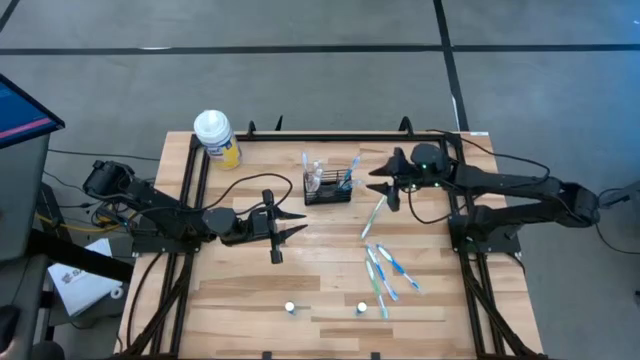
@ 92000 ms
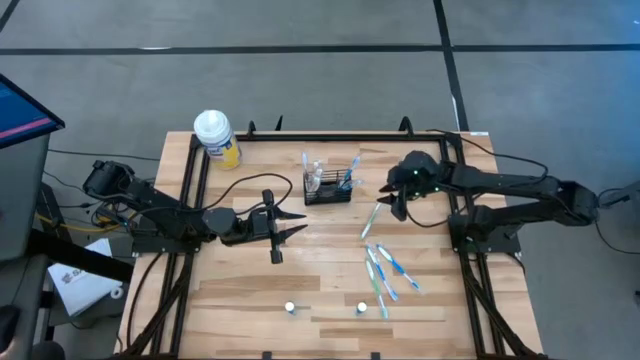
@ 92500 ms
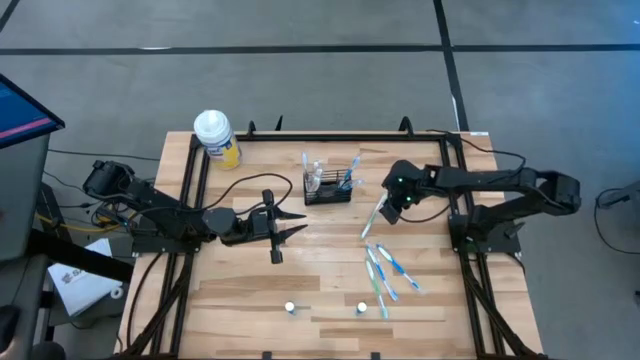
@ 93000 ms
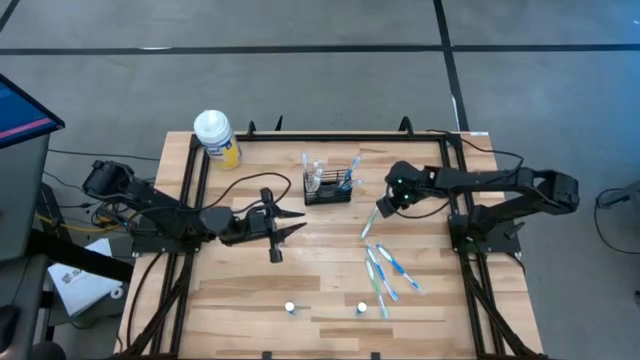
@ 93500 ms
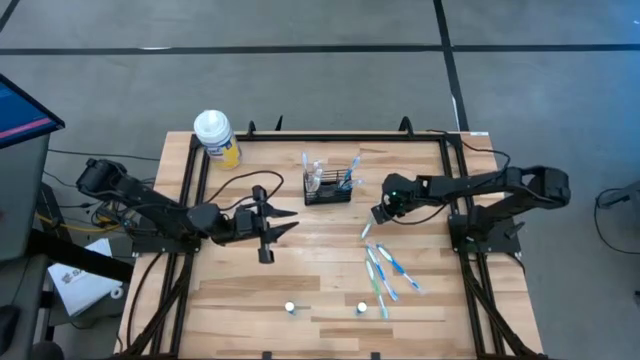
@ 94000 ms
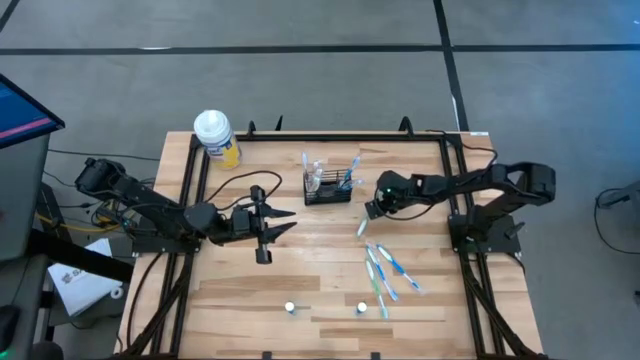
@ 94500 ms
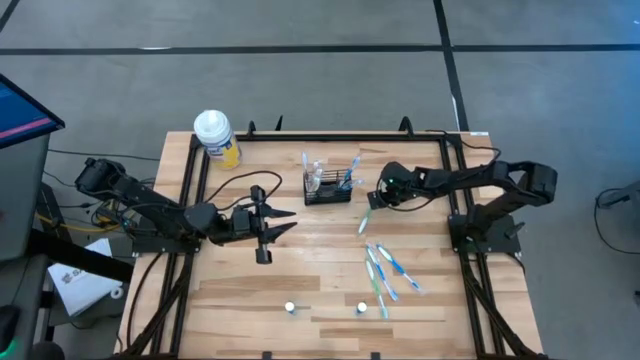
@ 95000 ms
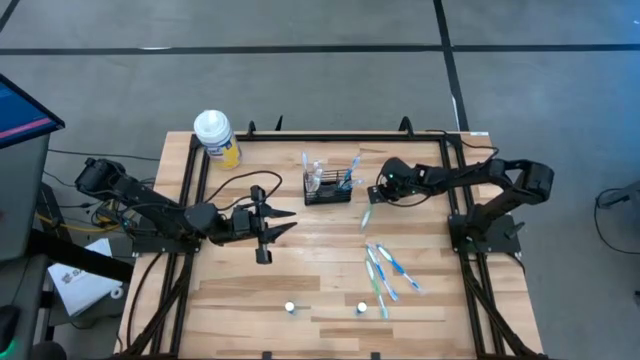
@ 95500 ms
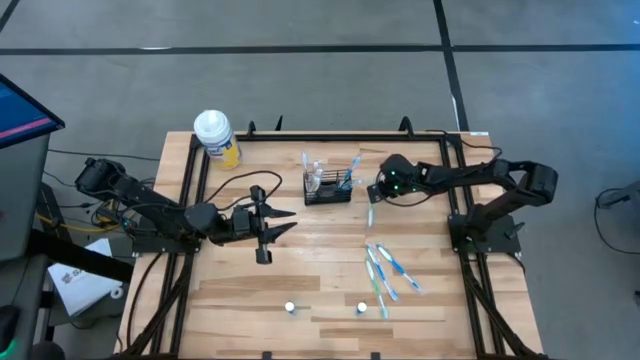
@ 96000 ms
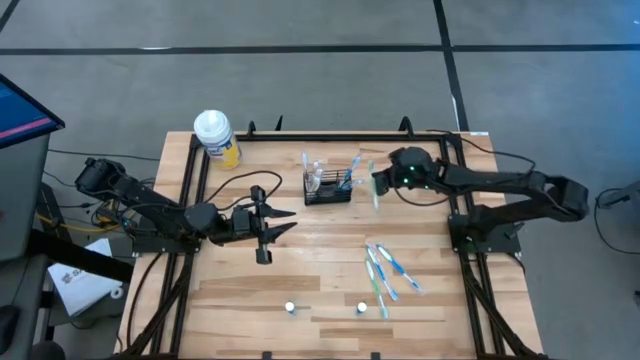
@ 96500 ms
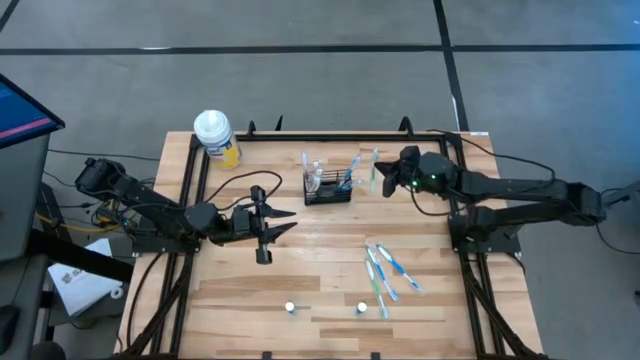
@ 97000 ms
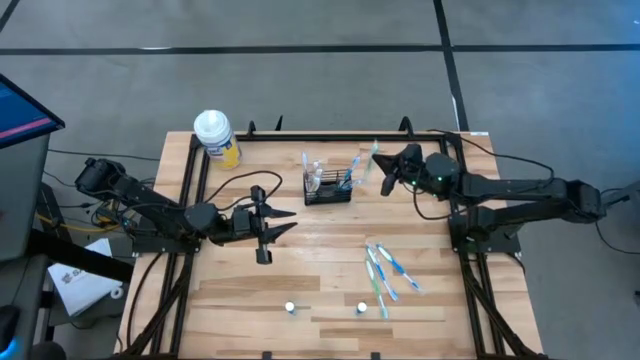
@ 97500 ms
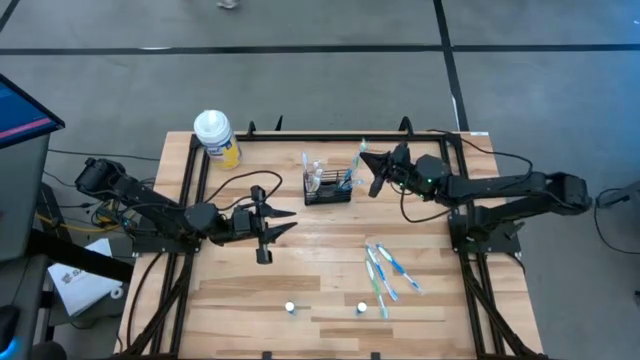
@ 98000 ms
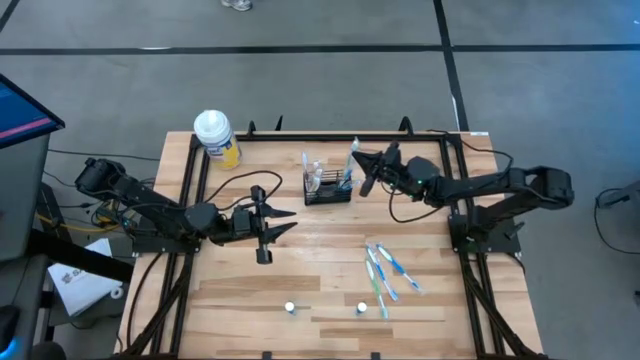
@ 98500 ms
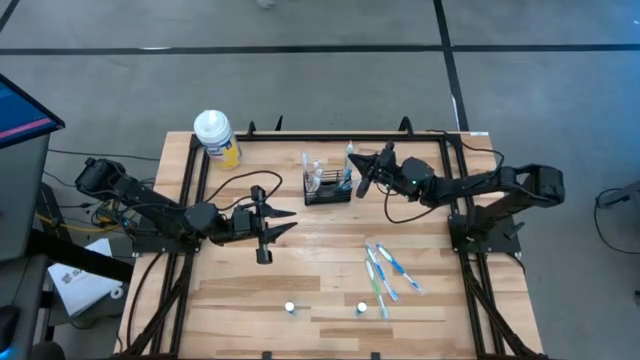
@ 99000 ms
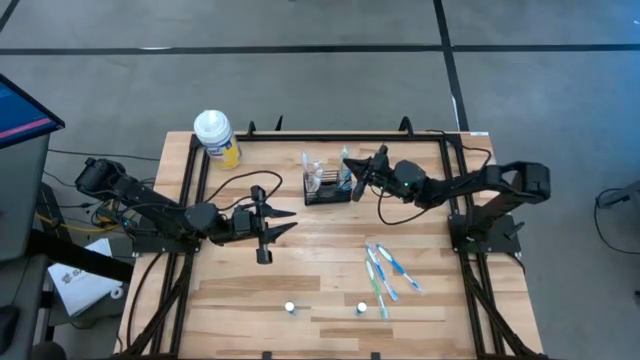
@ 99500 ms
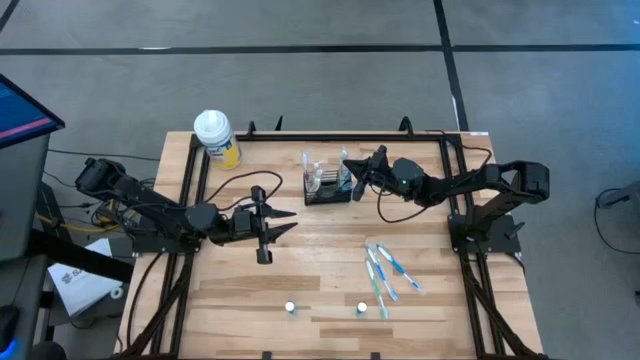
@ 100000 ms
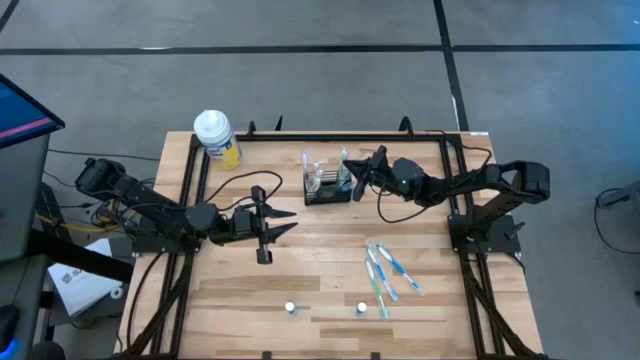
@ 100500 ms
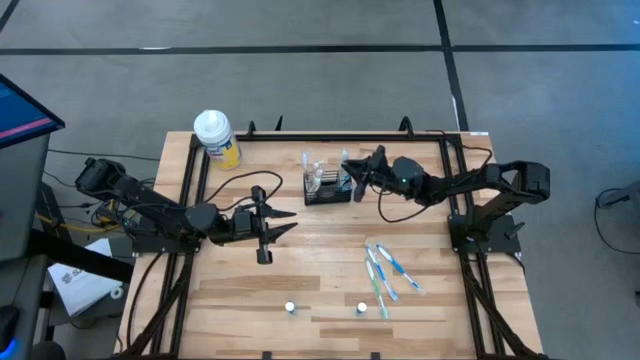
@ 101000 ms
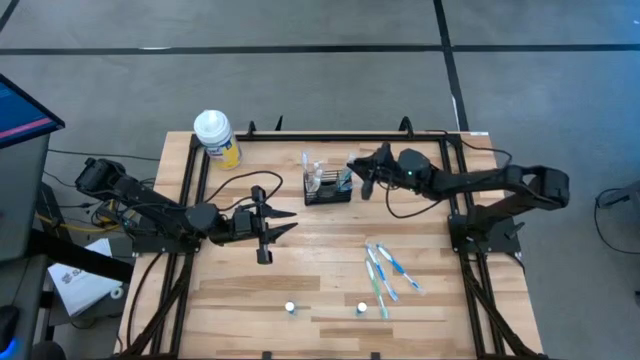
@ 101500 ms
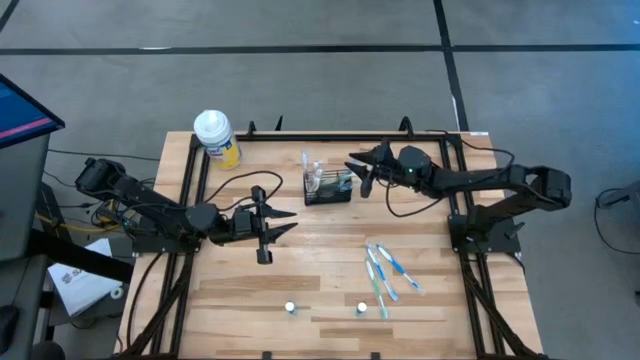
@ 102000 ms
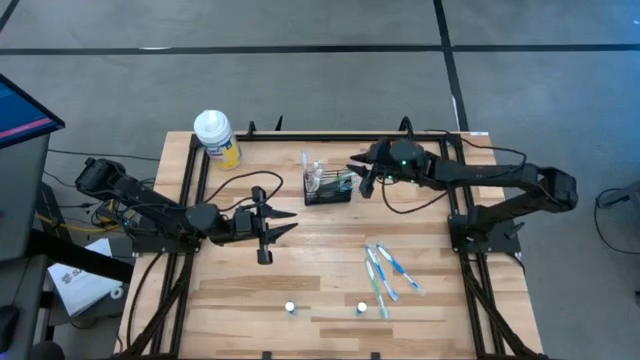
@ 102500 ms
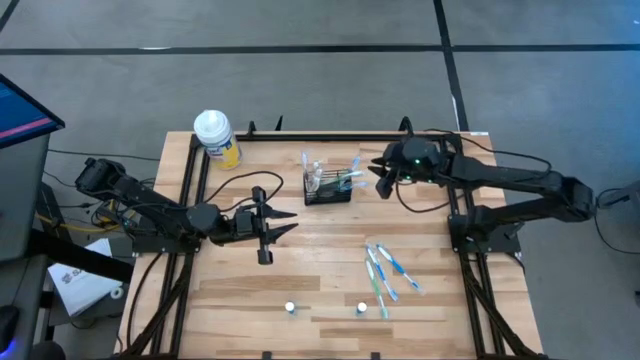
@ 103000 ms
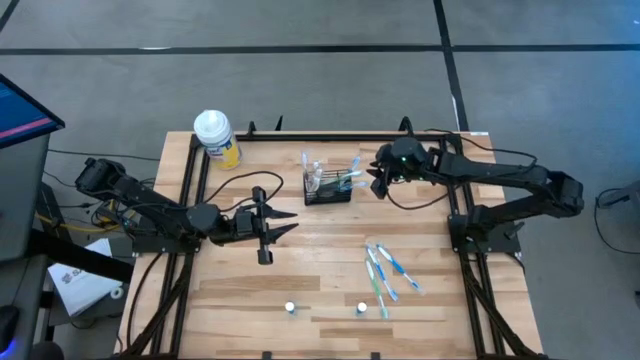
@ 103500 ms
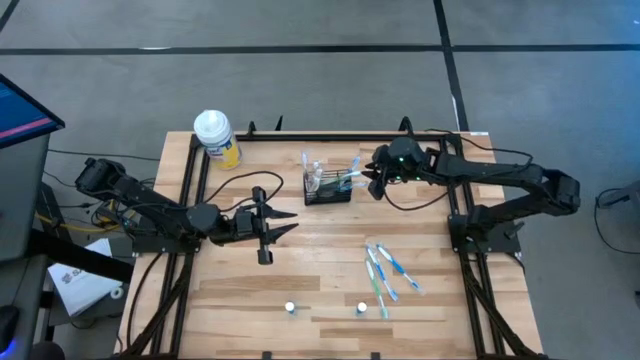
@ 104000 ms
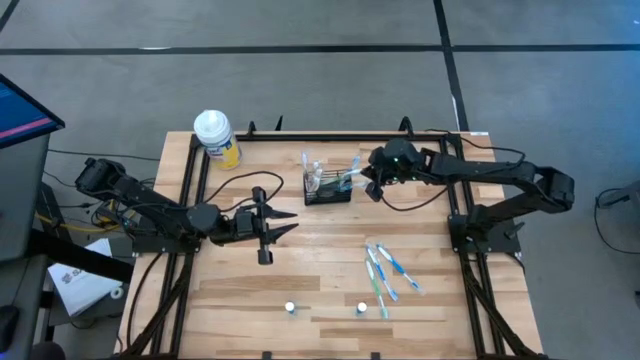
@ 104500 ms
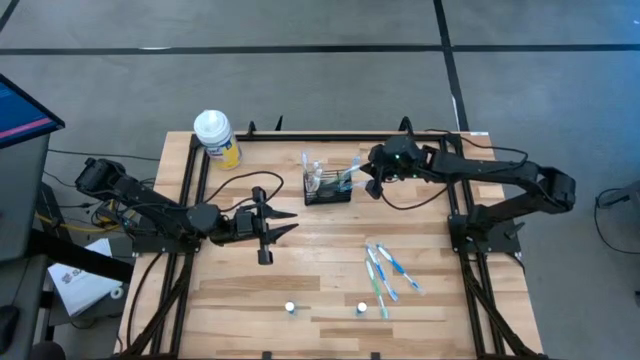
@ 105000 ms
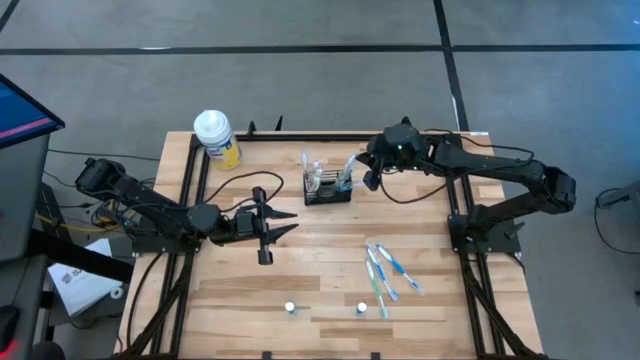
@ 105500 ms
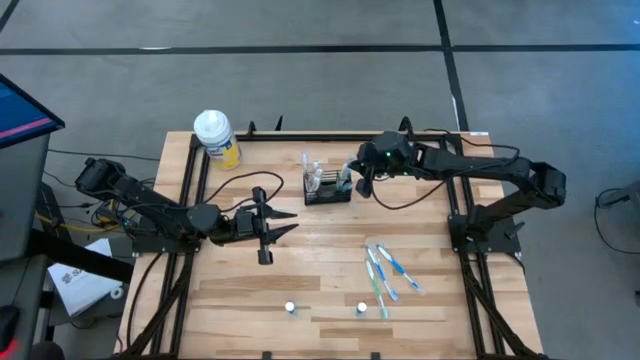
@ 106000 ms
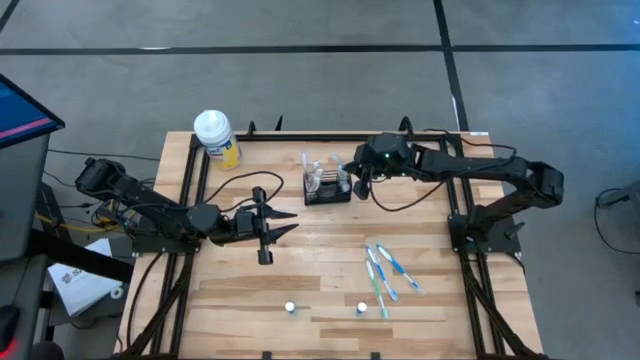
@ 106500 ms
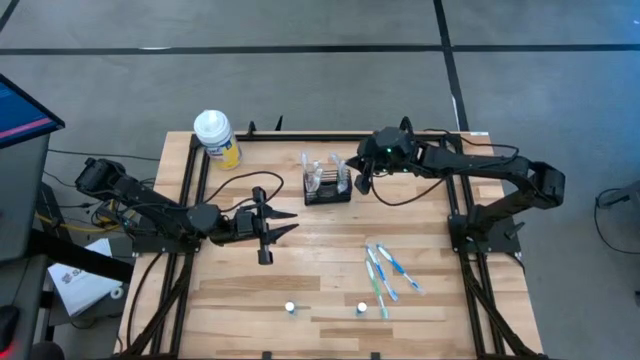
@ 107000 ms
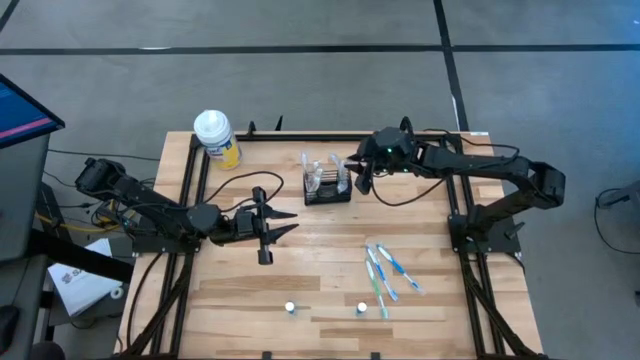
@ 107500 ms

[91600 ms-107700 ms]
Task: Pick & Place toothbrushing station
Put the green toothbrush into the black mesh organizer

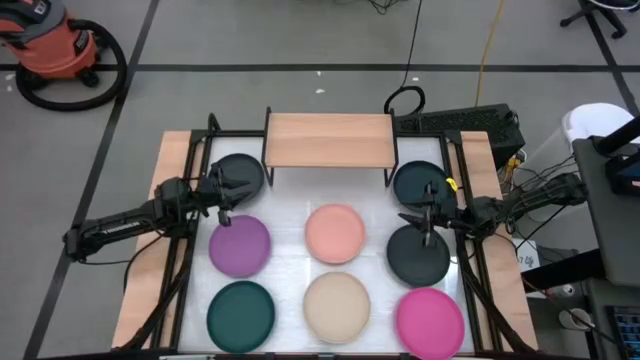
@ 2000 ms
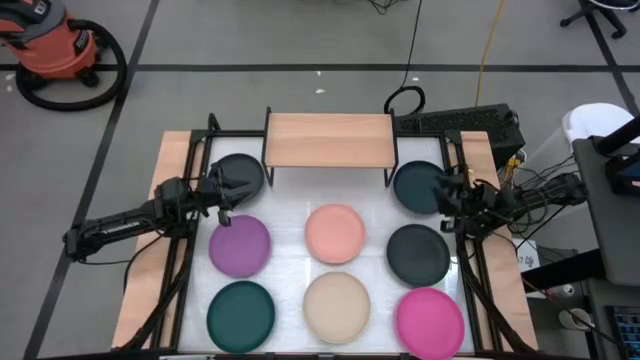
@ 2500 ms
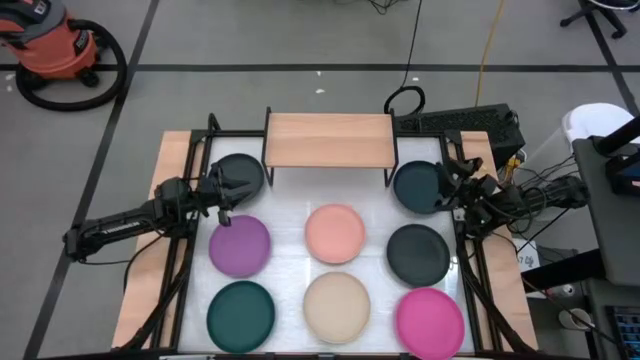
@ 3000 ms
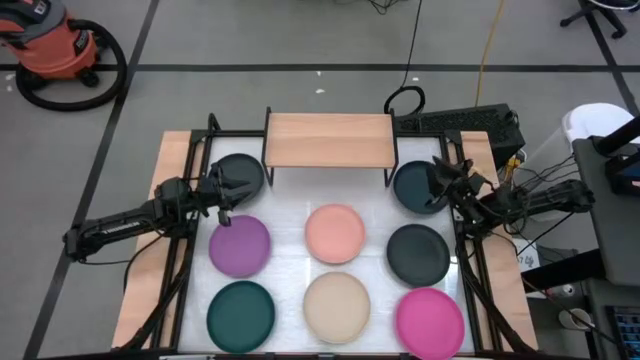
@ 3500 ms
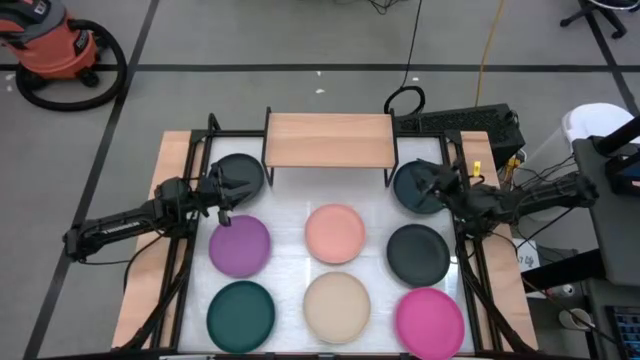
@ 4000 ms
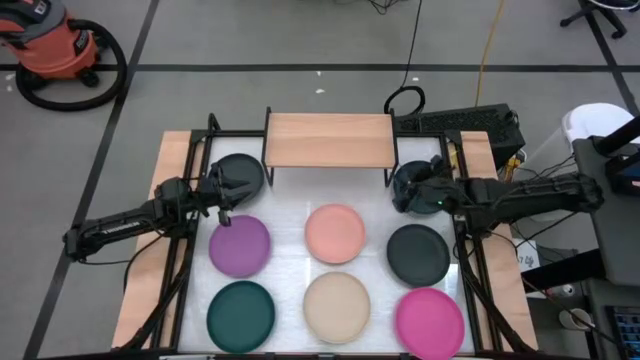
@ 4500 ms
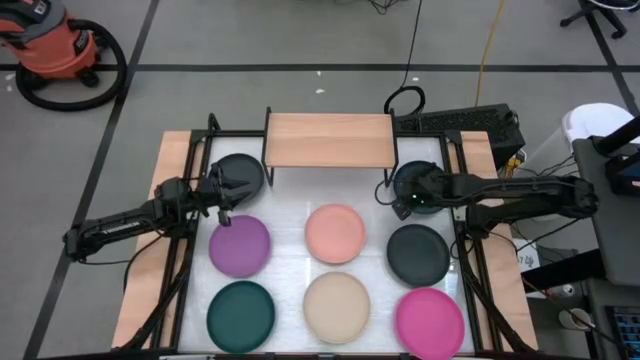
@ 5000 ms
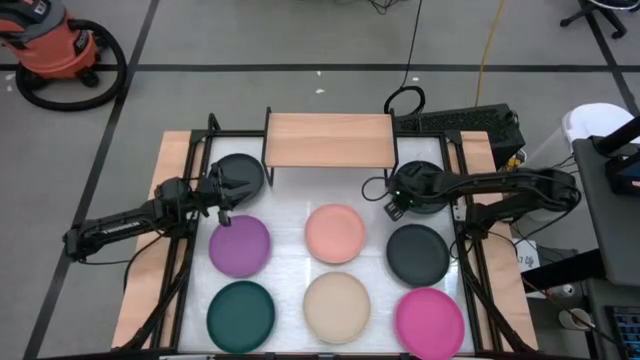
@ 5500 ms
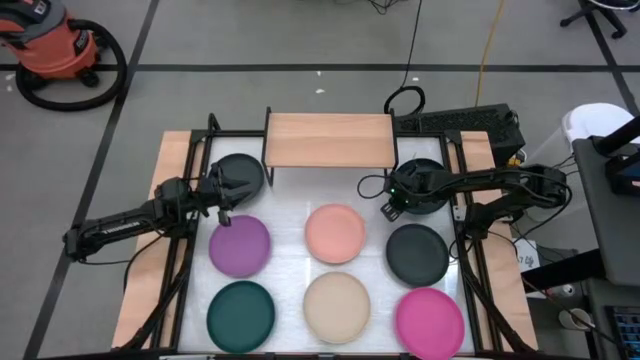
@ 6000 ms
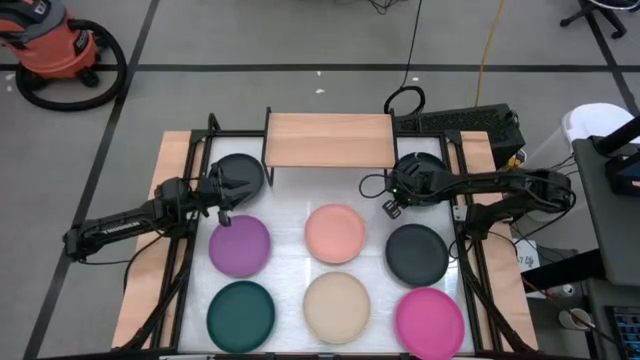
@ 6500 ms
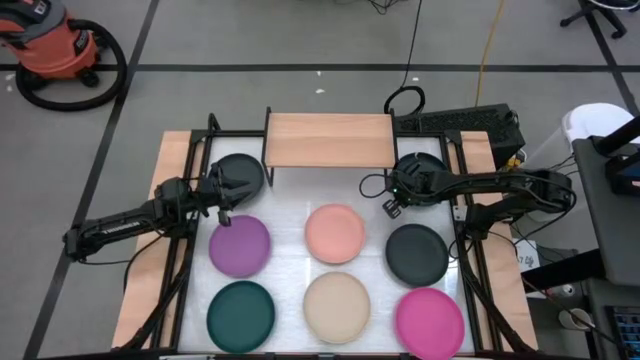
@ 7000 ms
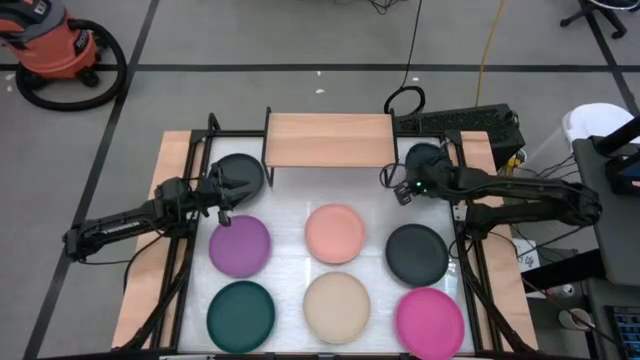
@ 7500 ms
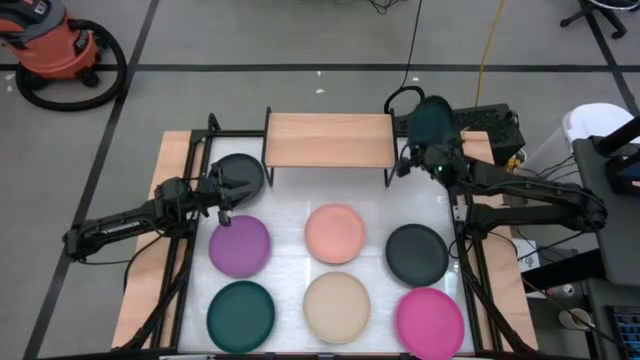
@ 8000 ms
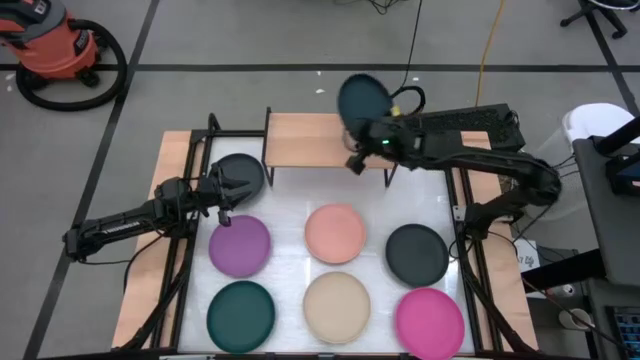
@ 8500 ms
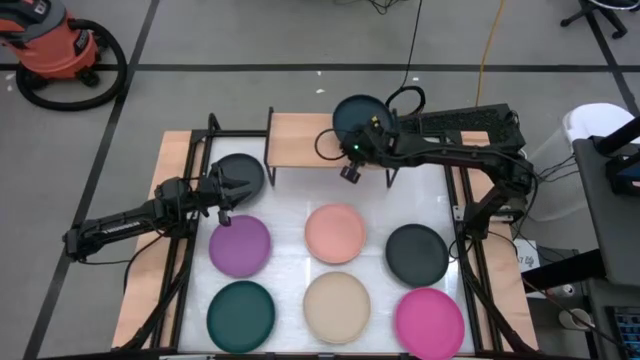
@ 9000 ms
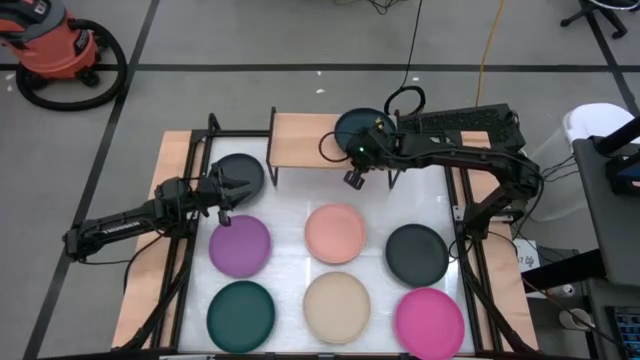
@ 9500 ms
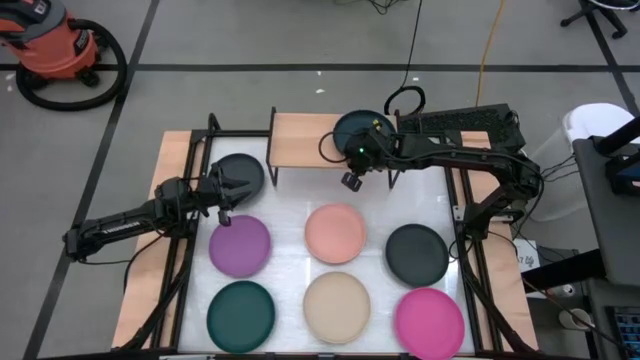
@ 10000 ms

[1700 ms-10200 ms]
Task: Place and stack plates onto a shelf
Put the dark blue plate on the shelf
